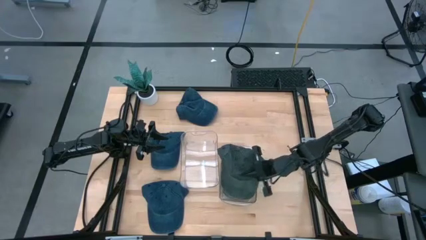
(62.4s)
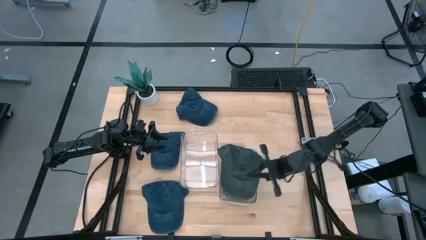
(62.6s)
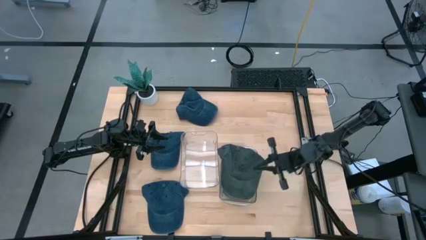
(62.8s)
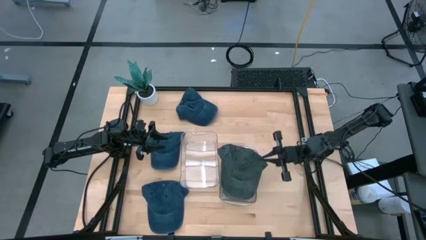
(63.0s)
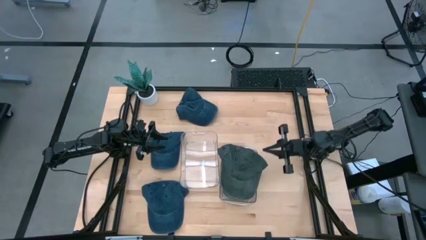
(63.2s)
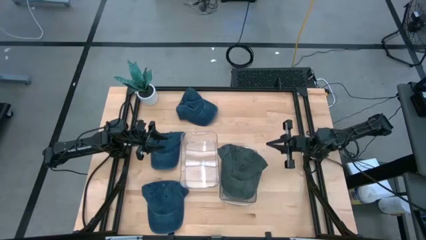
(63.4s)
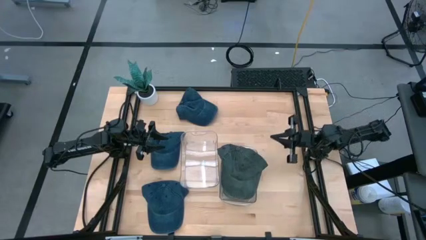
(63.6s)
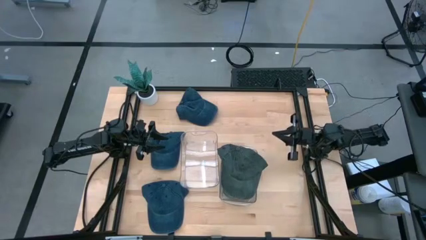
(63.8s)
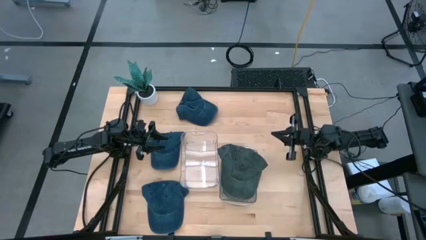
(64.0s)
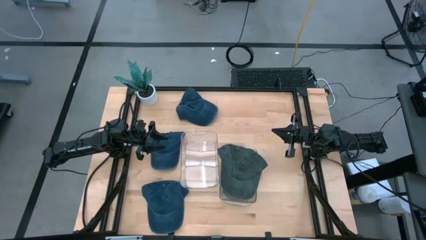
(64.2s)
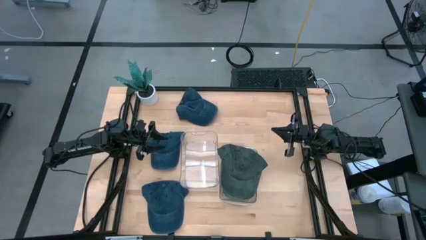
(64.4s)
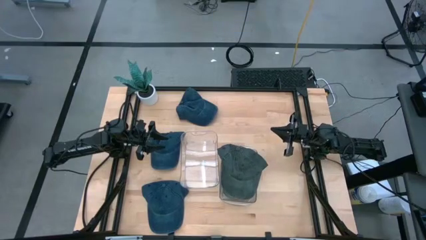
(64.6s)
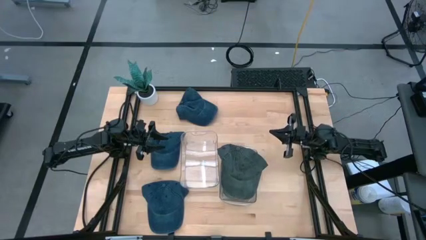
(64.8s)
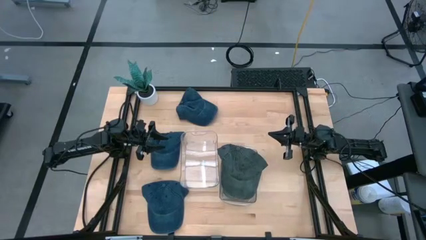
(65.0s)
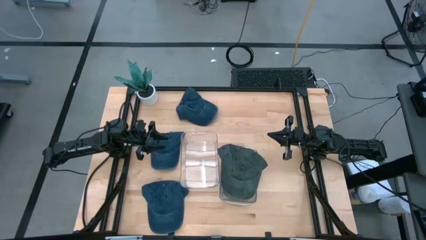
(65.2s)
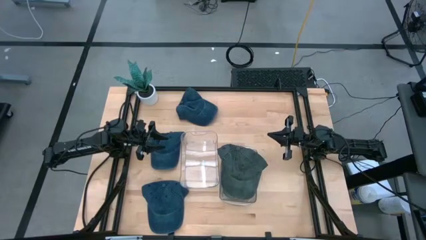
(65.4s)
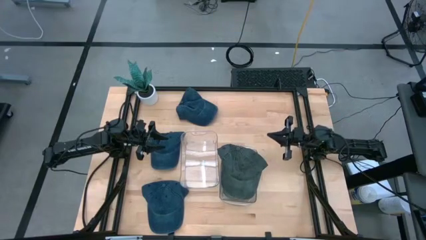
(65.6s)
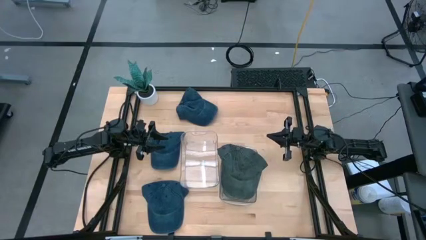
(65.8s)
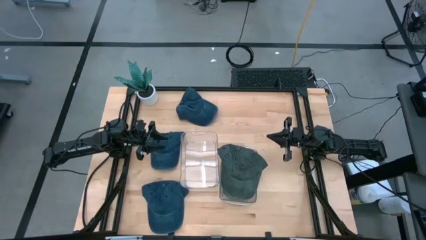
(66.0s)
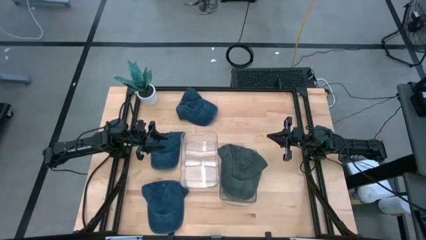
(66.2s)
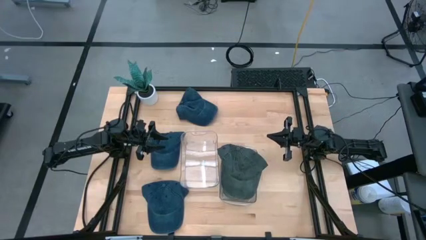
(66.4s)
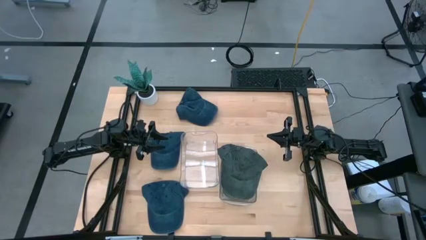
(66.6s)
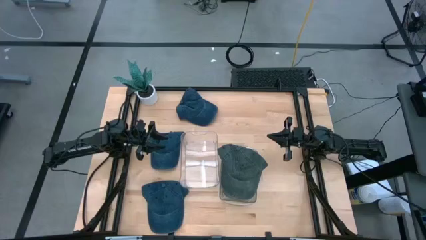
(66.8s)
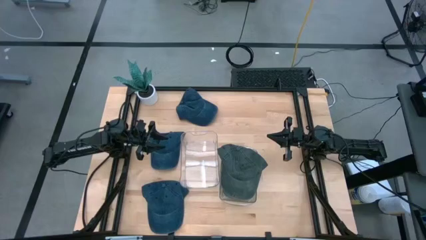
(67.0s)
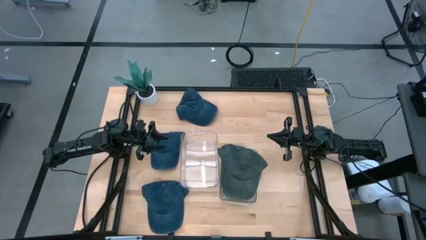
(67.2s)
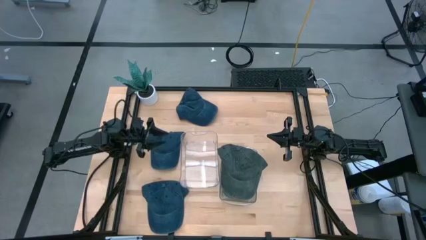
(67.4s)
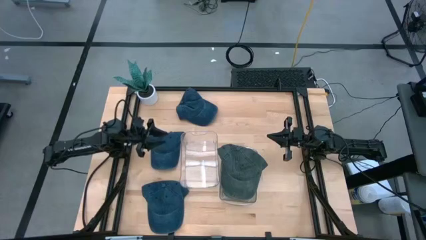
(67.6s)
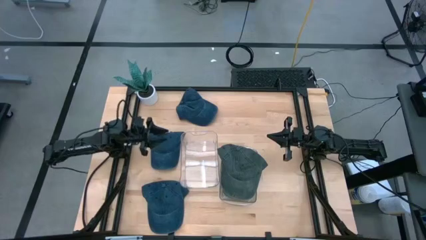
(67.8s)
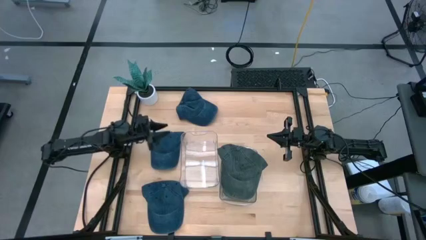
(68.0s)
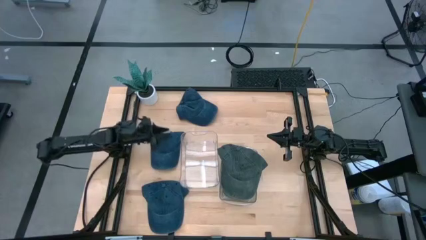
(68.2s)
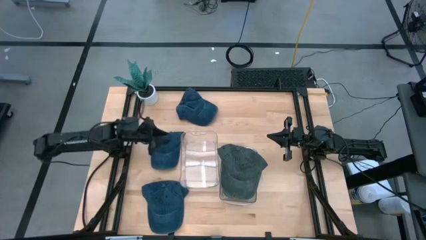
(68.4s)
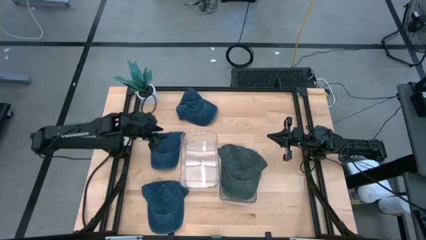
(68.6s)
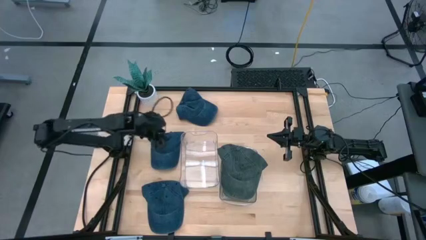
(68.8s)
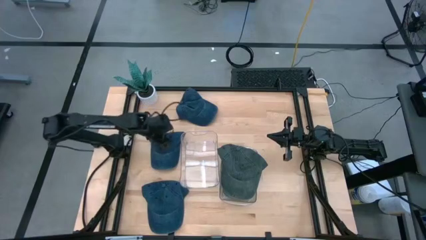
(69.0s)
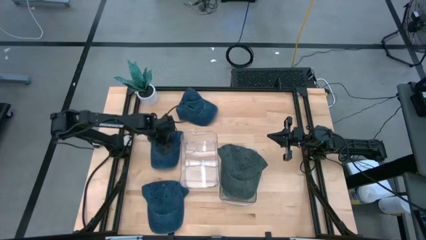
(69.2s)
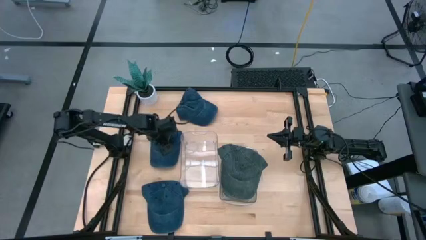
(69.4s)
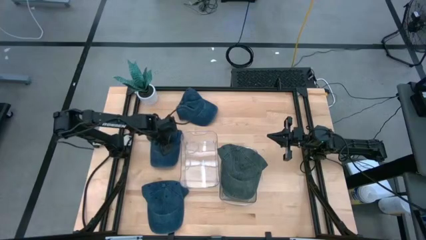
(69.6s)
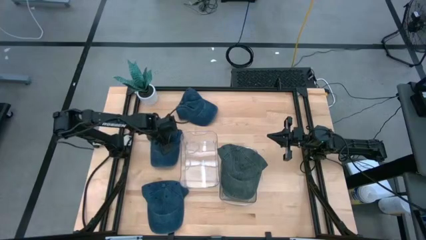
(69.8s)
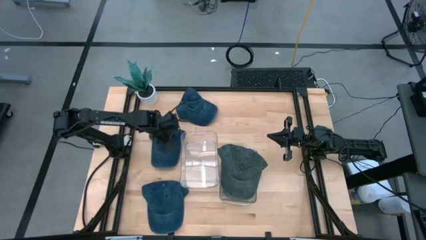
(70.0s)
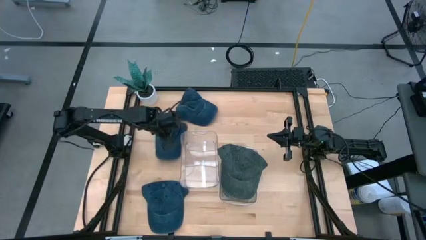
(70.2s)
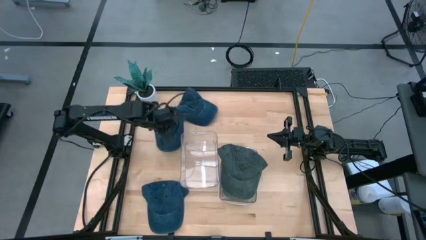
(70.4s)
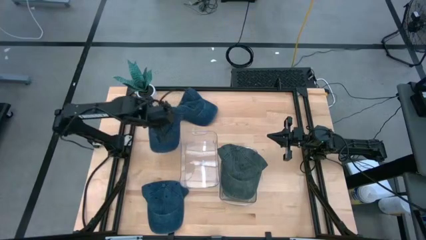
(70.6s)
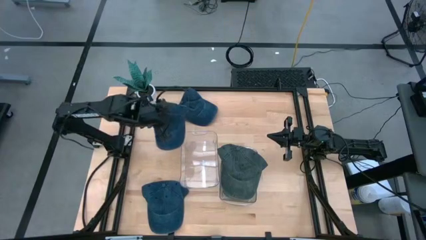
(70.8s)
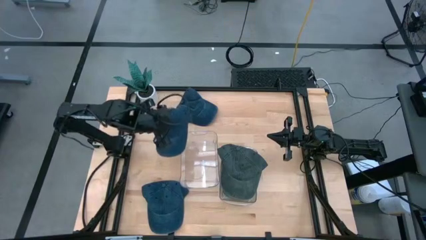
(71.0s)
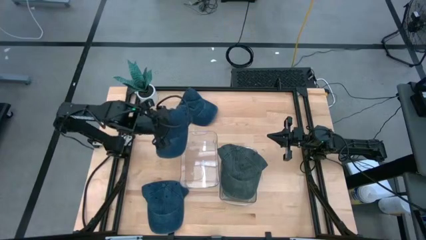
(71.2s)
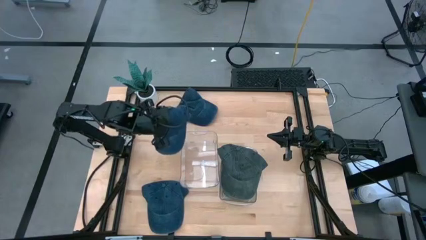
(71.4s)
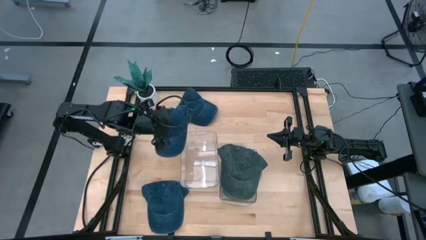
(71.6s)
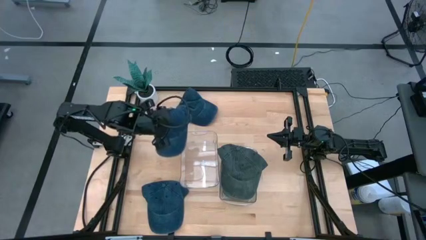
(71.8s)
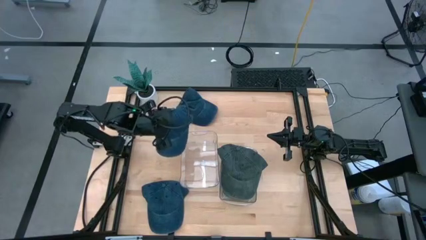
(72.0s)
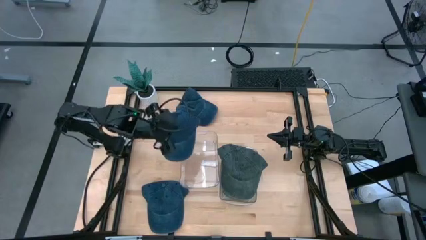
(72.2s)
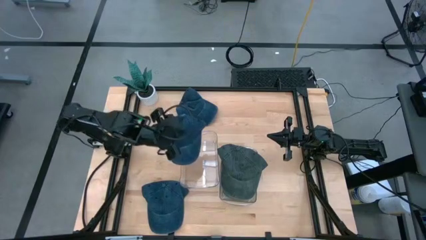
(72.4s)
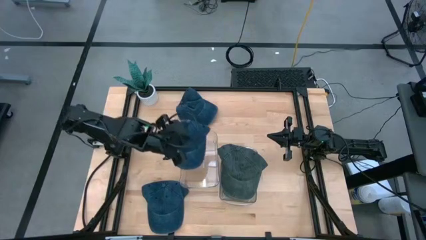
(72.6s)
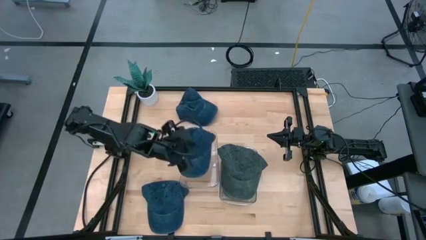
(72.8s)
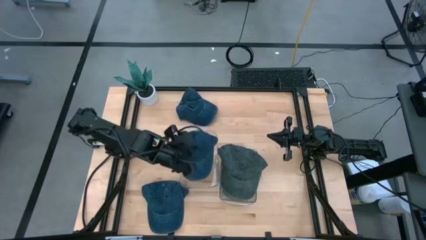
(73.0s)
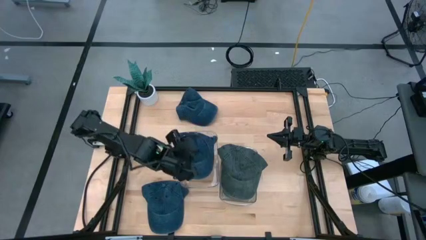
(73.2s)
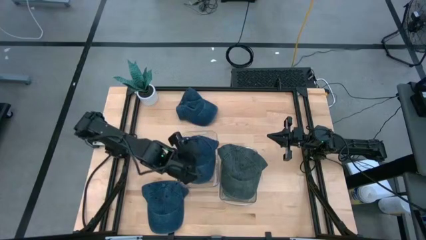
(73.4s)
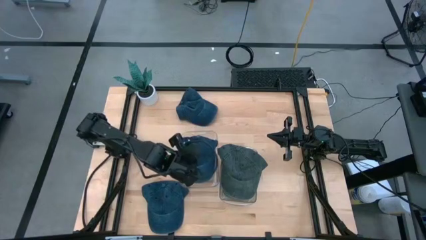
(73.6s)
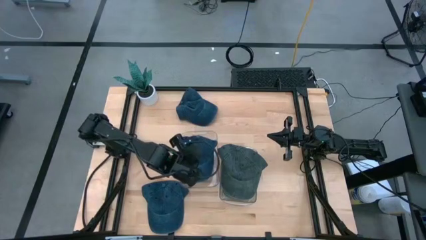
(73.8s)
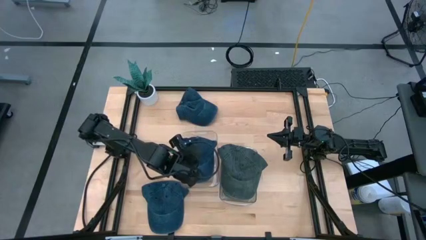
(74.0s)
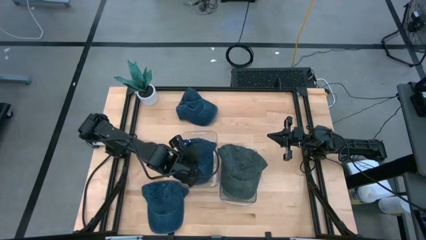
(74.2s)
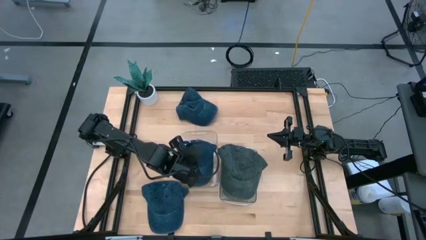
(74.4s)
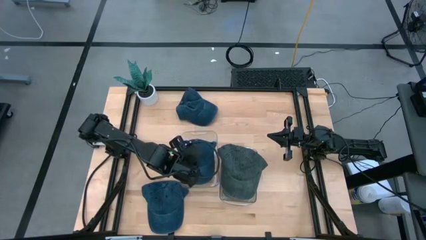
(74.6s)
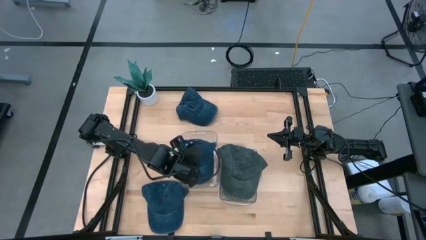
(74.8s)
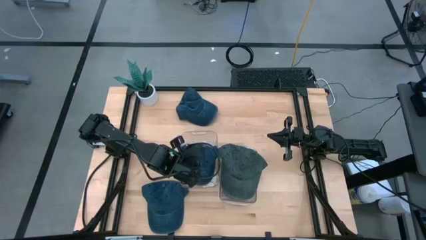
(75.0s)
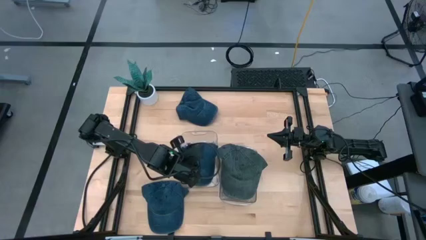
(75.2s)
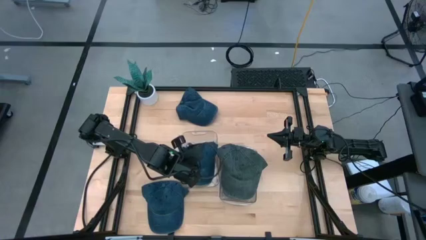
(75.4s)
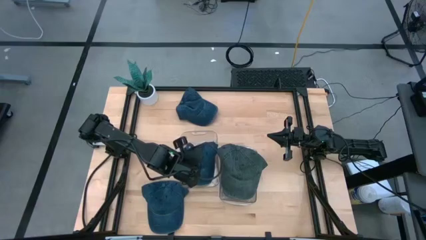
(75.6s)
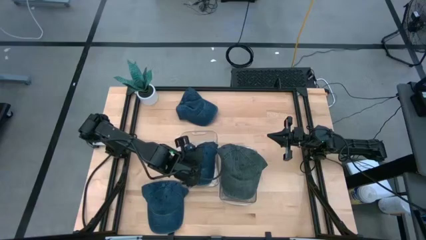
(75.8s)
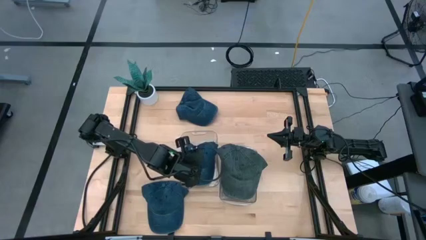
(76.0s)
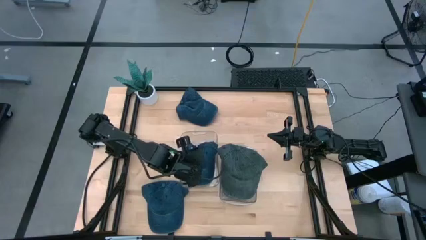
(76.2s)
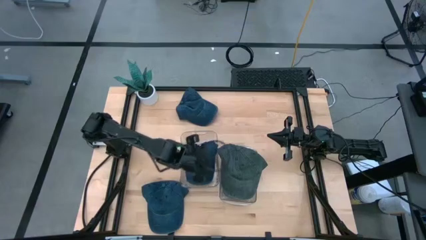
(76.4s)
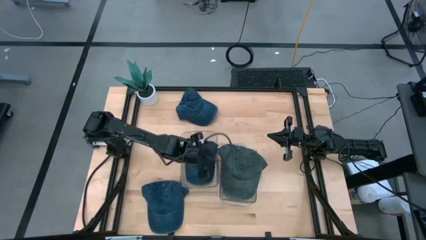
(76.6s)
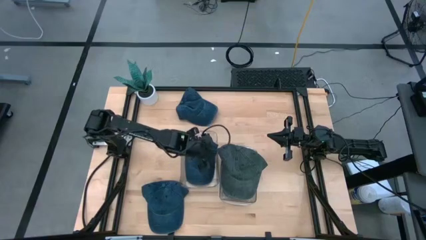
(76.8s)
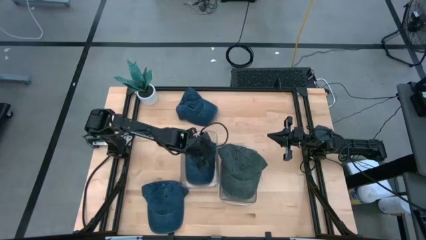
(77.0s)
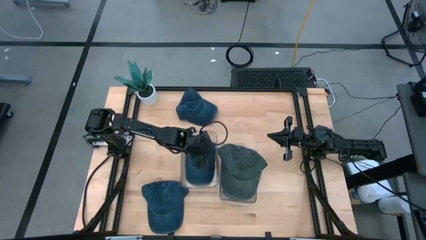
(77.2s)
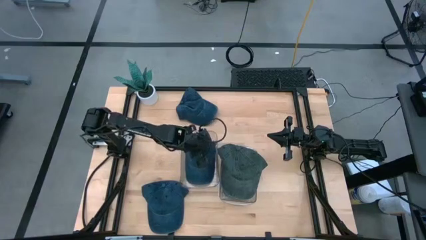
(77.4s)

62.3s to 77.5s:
Task: Pick & Place hat
Put the middle blue cap into the left transparent bin

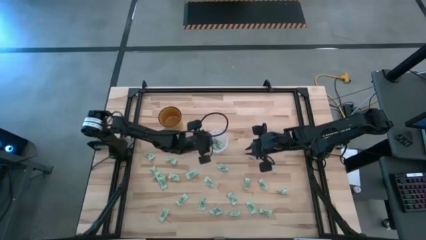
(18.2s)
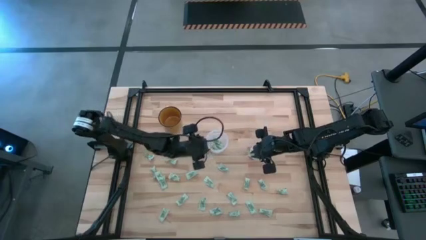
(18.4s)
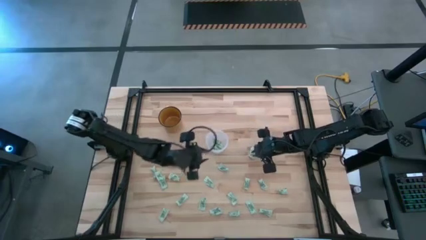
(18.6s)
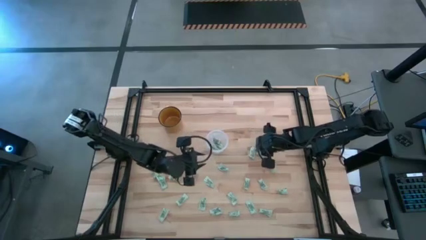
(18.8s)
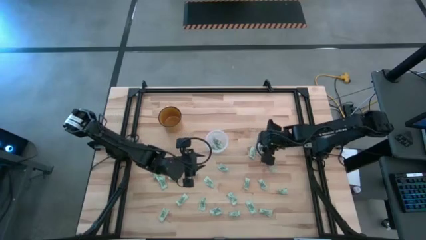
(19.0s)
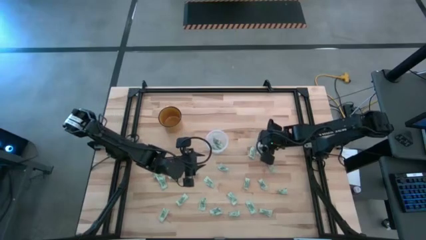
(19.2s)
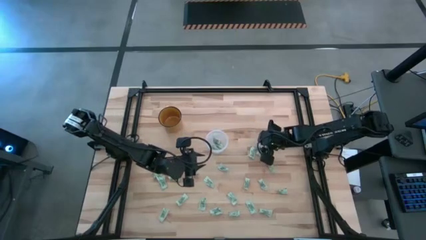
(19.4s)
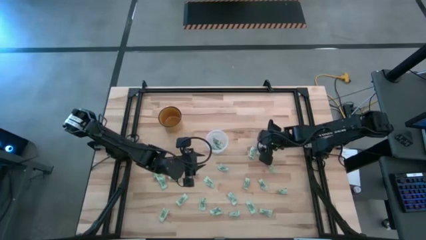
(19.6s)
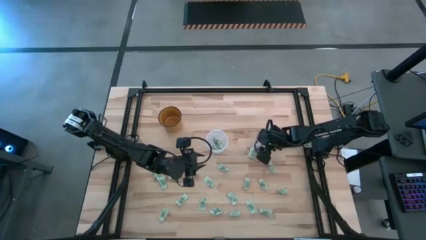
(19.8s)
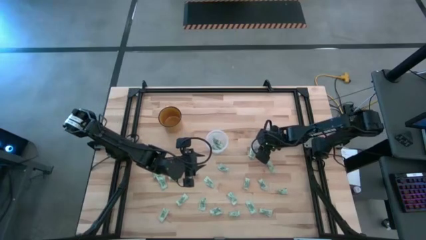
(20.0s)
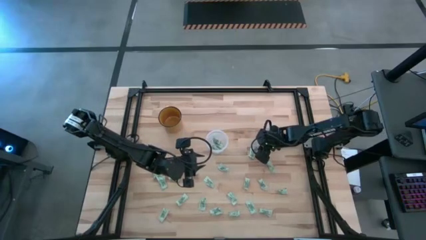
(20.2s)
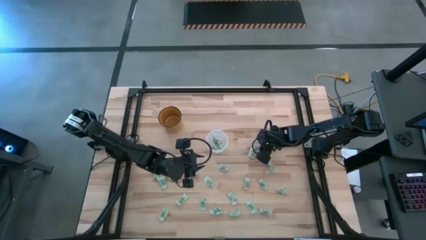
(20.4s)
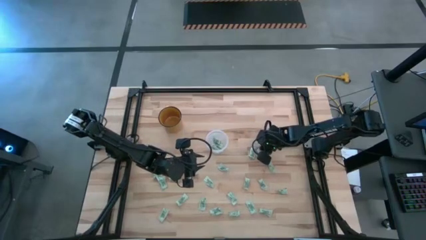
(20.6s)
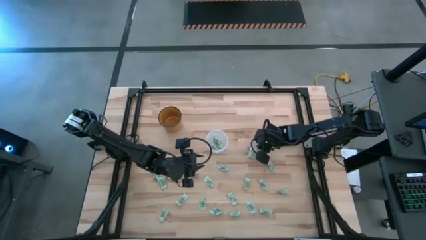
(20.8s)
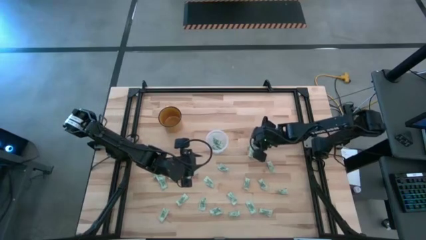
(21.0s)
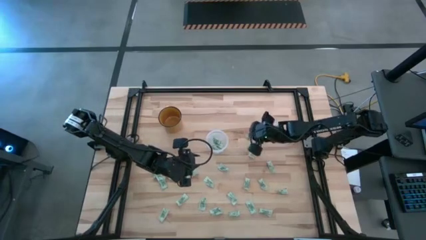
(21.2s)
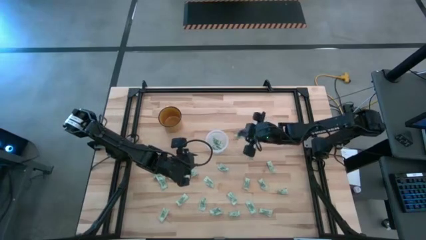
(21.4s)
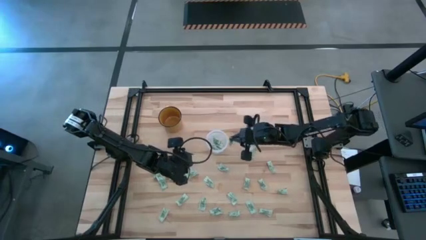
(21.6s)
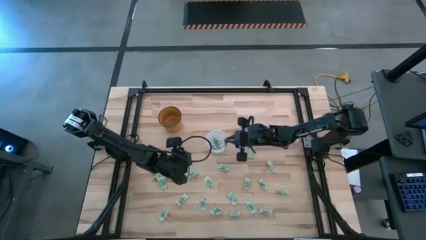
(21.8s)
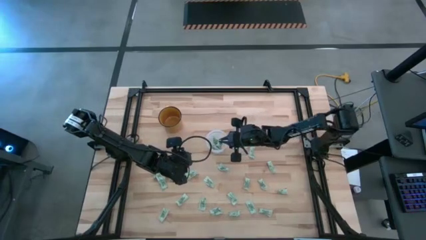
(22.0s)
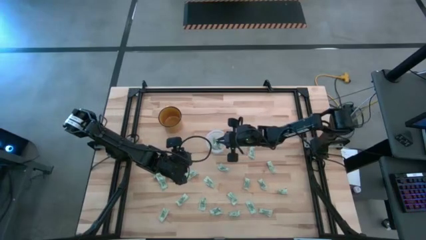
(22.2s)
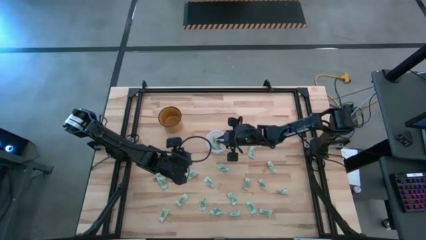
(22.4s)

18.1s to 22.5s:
Task: Pick and place Stevia / Truvia into bins
Put the stevia packet into the transparent container
